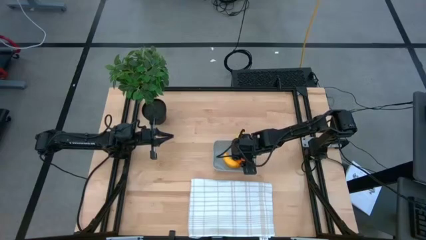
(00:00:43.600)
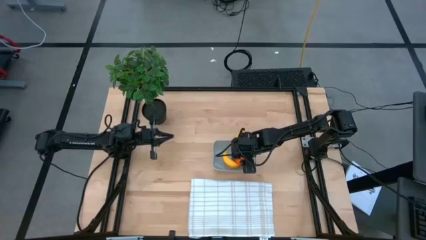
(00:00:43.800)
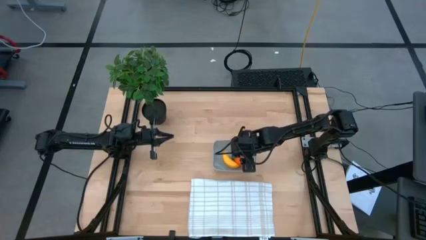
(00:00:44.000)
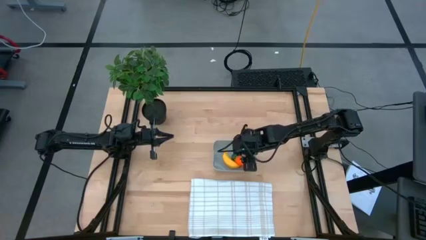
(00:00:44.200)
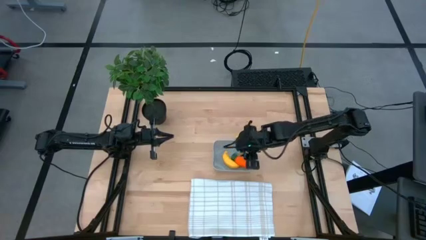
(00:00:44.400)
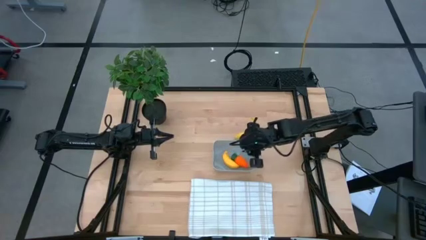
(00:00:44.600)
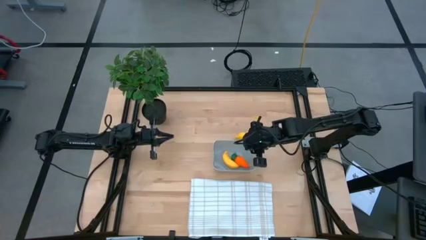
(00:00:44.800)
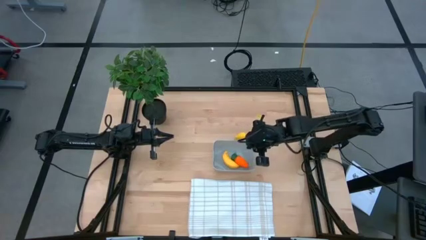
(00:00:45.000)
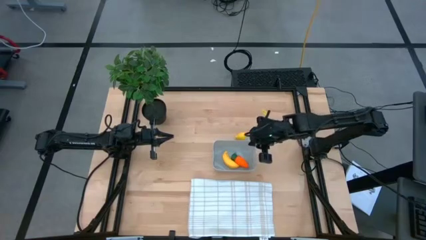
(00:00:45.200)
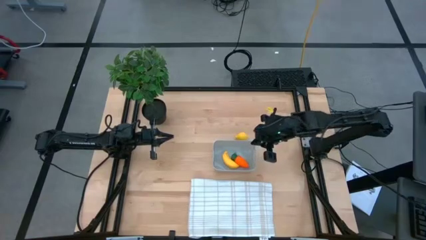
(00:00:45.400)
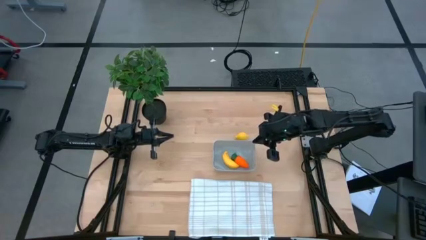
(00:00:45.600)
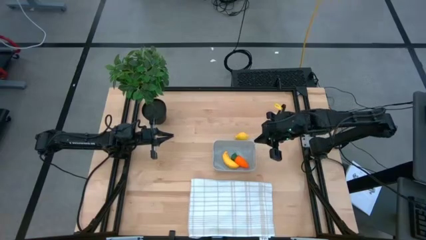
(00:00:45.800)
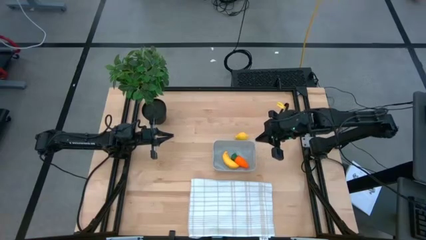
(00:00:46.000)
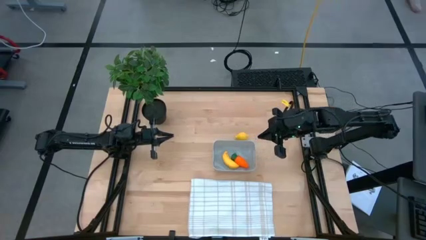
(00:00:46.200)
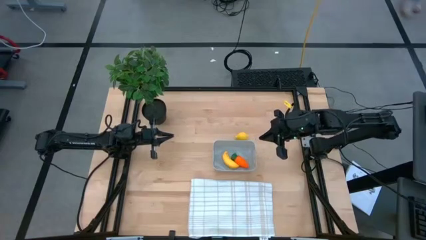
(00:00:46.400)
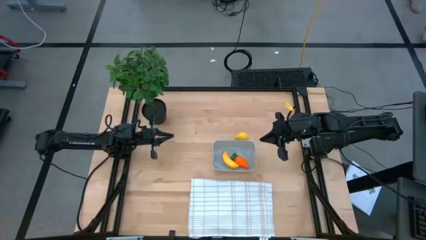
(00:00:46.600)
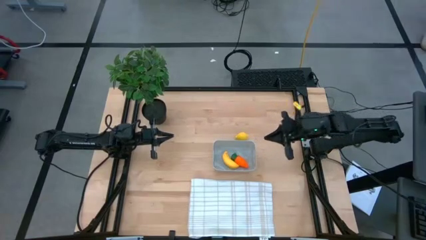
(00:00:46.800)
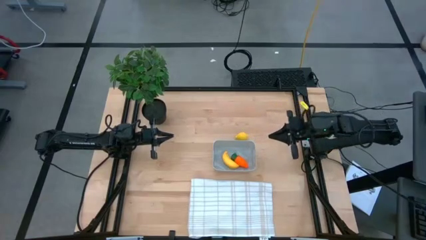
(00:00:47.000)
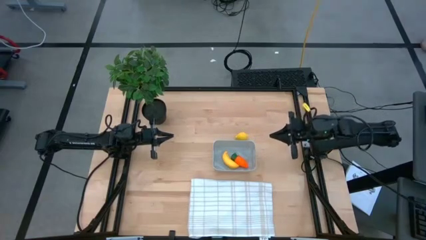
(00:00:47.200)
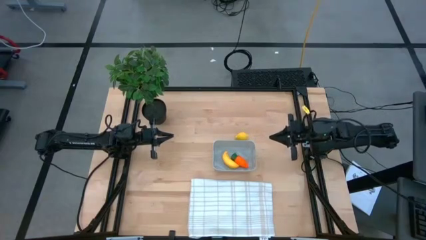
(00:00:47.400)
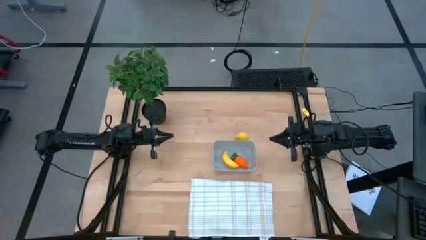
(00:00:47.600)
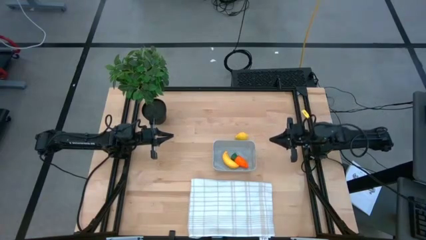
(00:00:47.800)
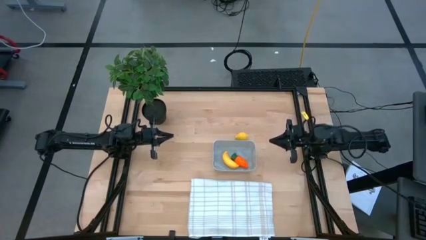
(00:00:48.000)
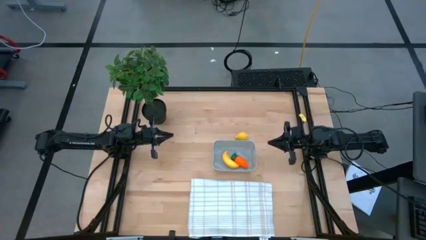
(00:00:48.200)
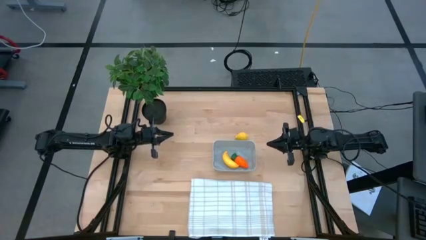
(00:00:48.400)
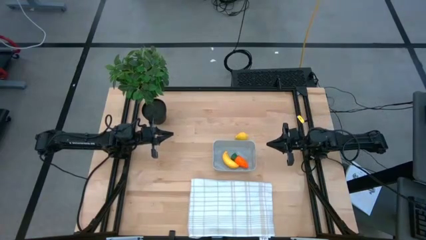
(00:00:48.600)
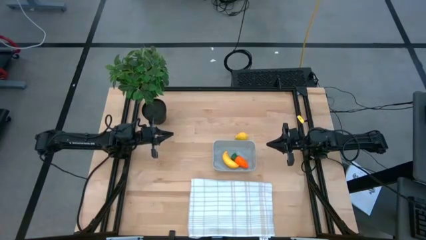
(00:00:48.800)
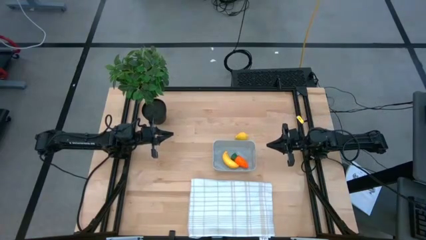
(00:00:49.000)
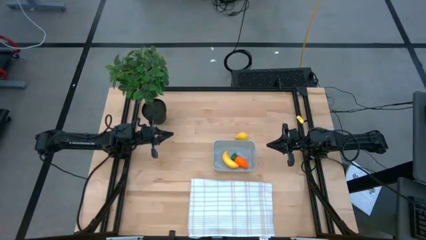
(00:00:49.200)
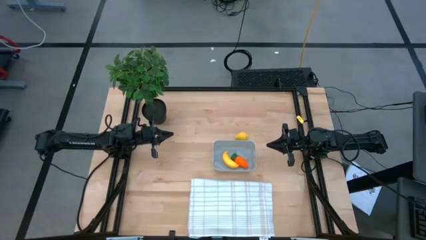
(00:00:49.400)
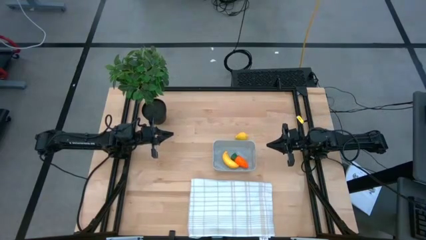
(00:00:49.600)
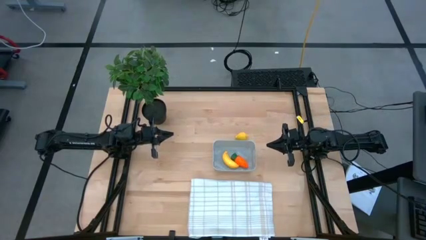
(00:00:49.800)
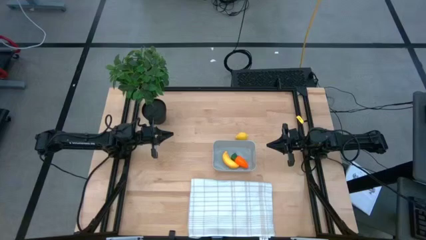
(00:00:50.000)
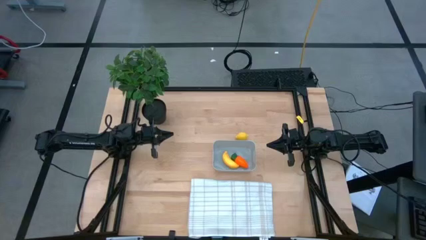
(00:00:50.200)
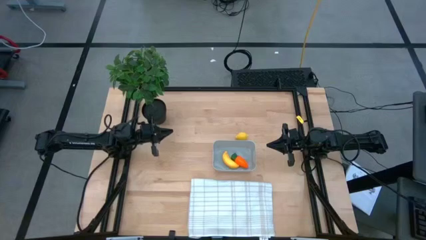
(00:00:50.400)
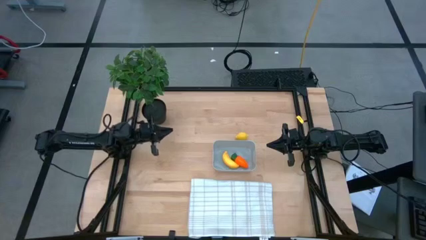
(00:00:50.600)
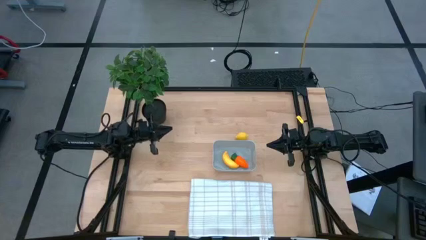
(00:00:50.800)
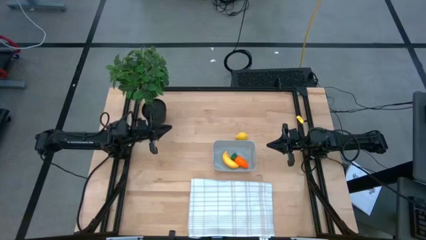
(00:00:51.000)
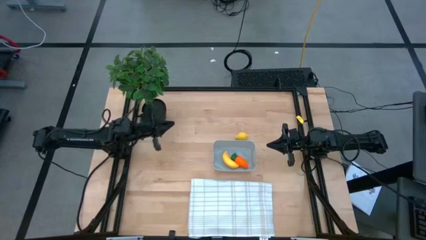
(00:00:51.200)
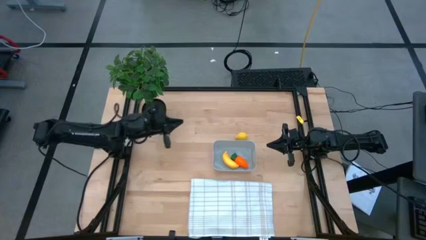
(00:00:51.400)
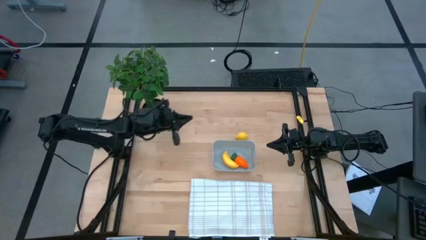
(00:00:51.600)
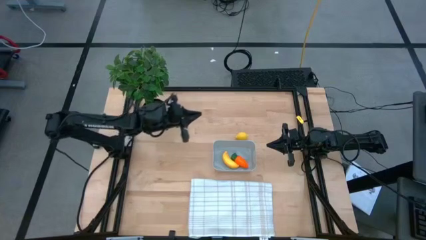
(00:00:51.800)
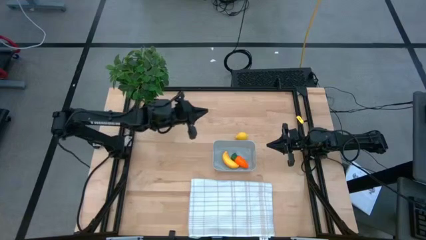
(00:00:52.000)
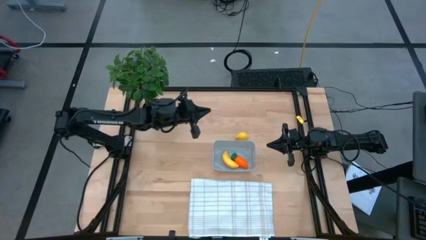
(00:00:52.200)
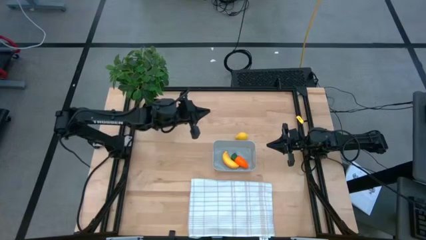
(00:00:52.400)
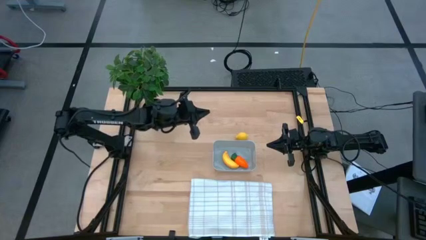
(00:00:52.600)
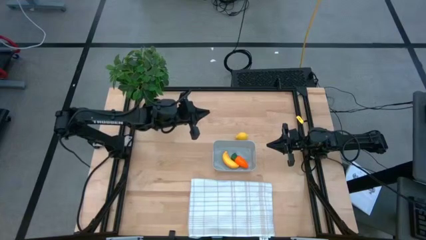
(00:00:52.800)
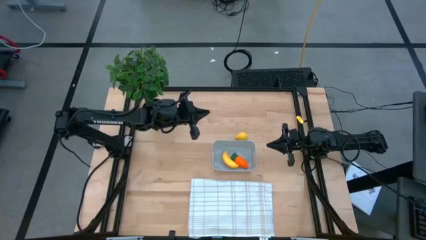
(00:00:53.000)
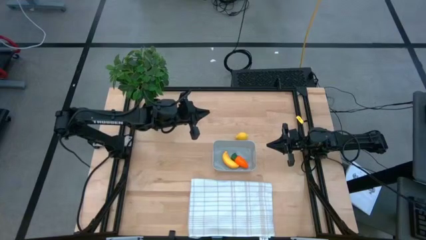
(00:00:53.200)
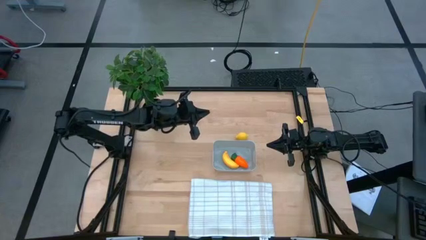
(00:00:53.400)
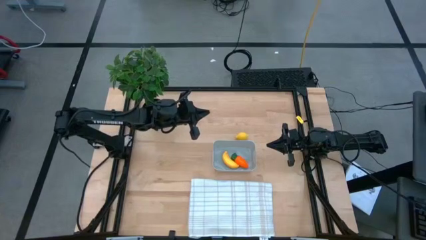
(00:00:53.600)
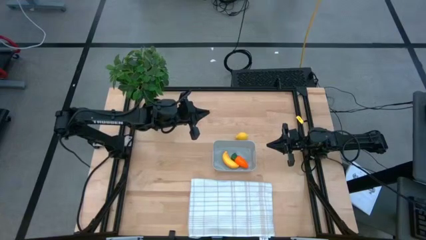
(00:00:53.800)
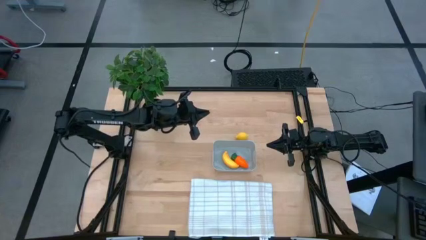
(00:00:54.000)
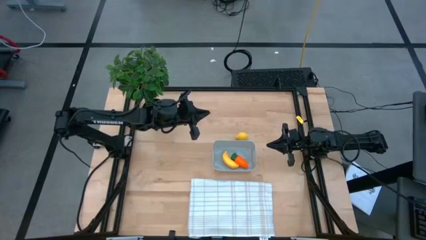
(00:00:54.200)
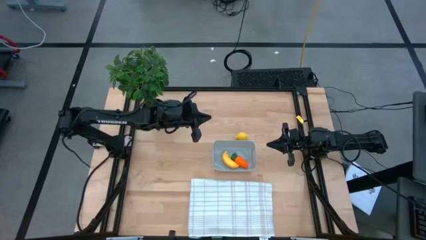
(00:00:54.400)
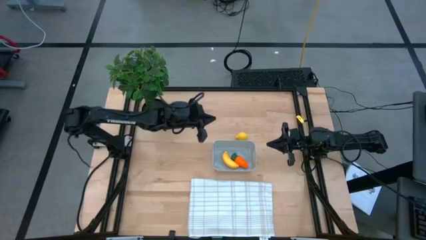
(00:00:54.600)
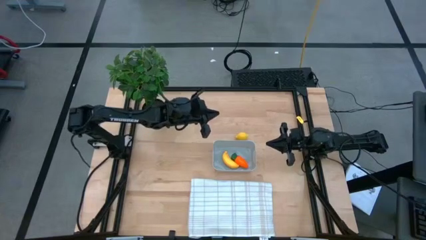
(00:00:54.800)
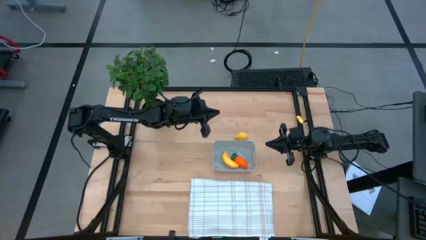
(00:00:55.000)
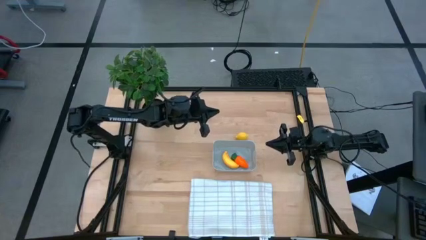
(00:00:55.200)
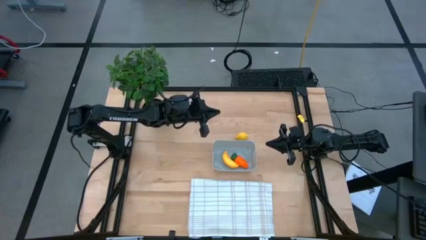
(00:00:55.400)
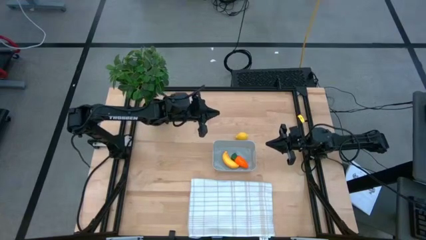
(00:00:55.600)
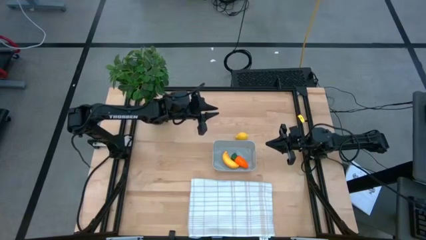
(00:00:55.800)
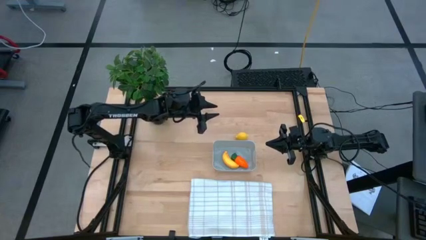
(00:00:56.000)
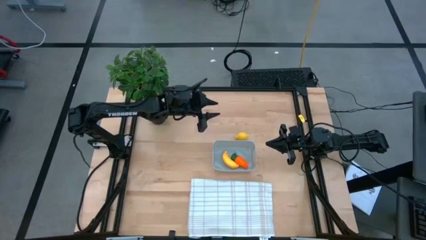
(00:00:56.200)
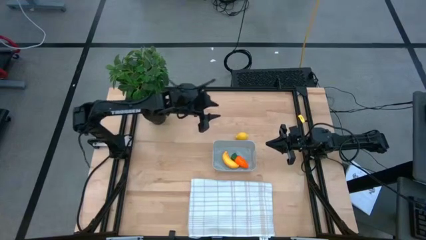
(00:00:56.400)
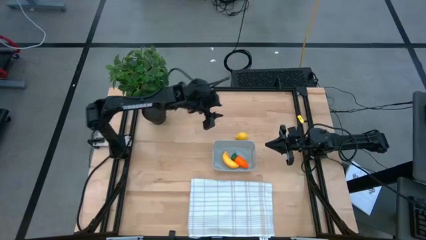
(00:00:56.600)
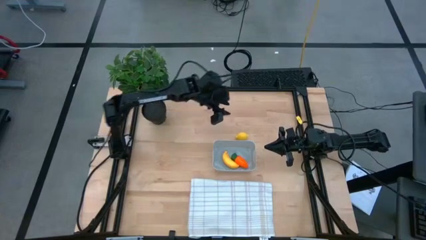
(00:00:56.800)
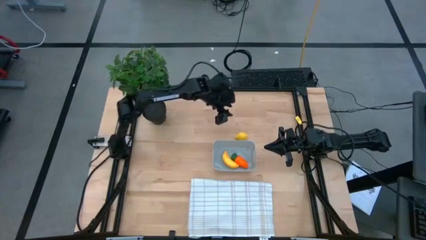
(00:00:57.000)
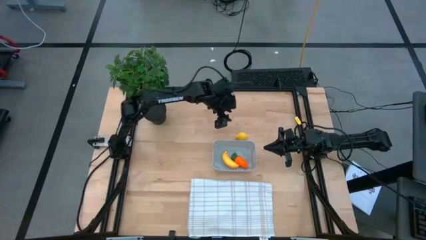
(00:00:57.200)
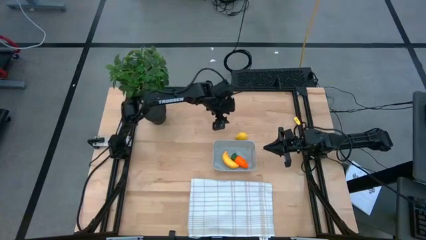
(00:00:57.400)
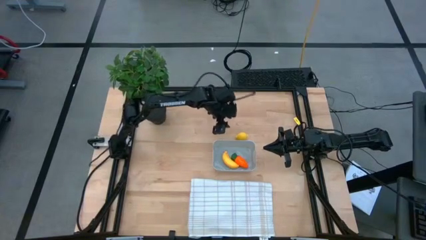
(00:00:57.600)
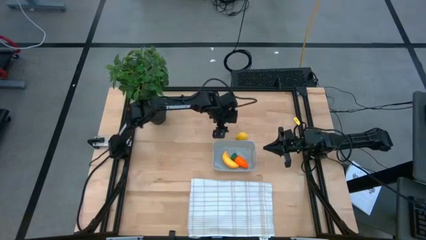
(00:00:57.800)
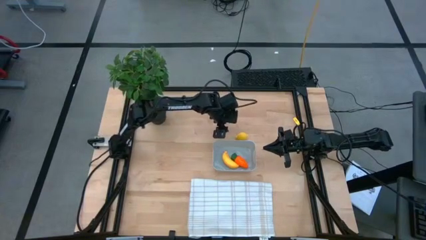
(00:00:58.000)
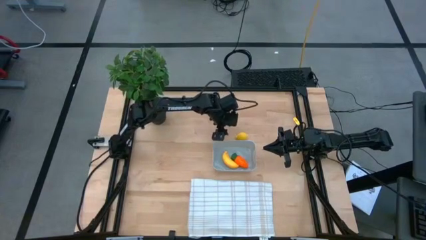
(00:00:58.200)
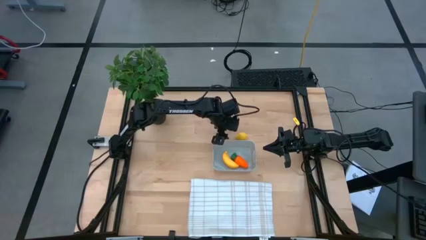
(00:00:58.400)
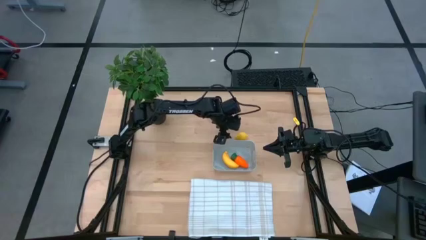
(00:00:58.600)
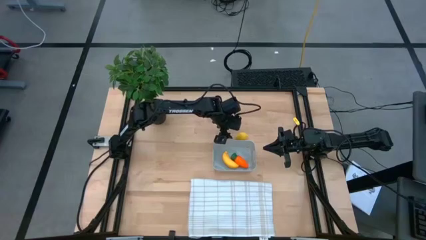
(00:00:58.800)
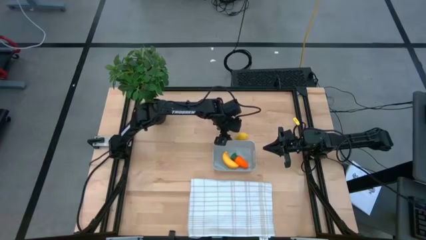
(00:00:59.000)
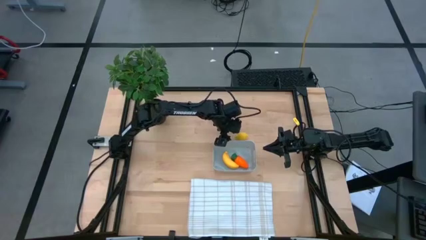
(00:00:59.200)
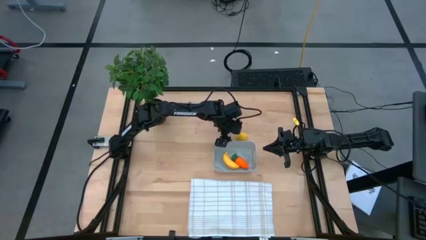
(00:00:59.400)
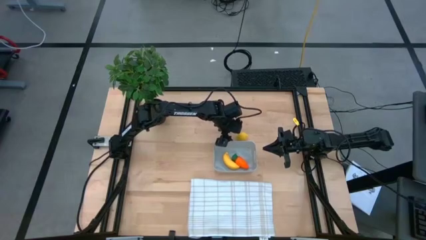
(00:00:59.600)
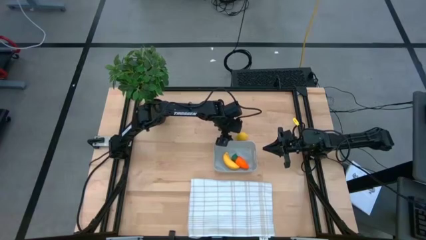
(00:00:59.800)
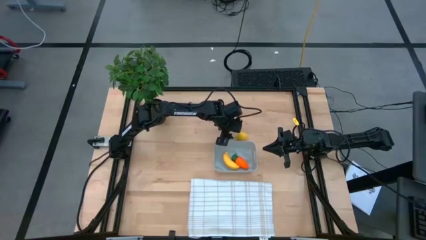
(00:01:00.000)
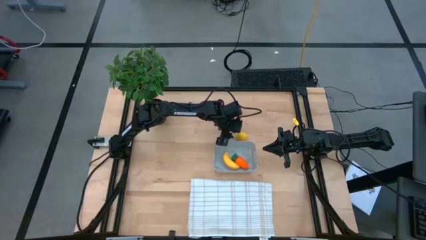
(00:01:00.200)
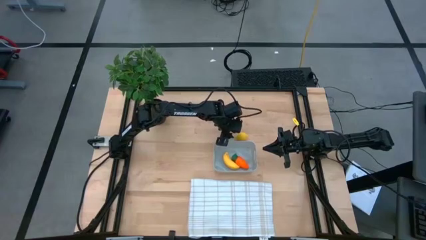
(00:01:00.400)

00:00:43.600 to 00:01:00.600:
Task: Pick and placing Produce into tupperware
Put the yellow lemon into the gray bin
